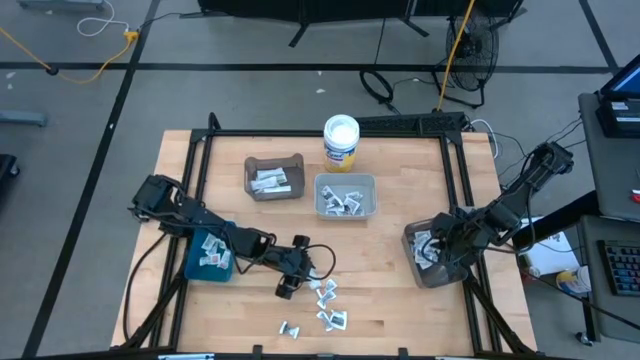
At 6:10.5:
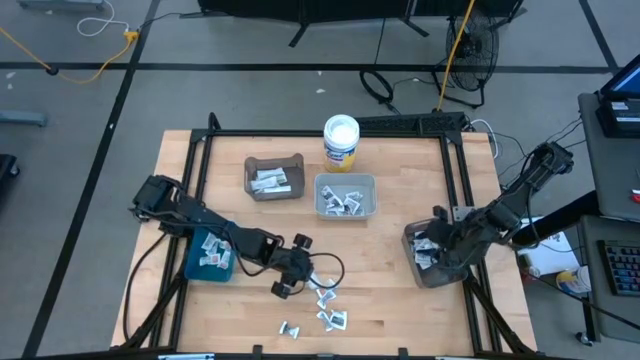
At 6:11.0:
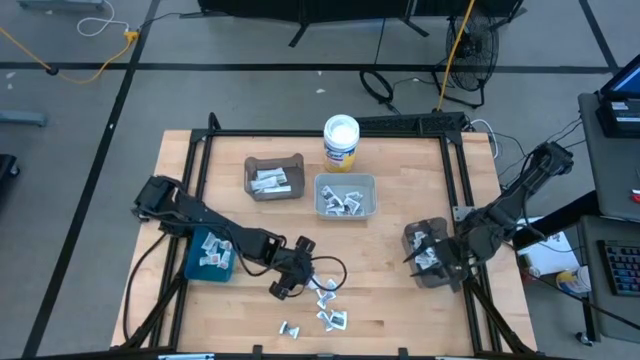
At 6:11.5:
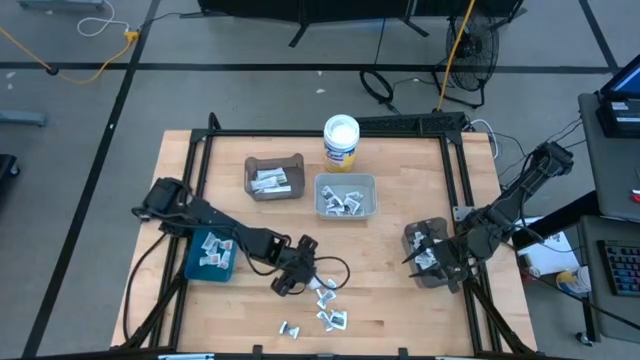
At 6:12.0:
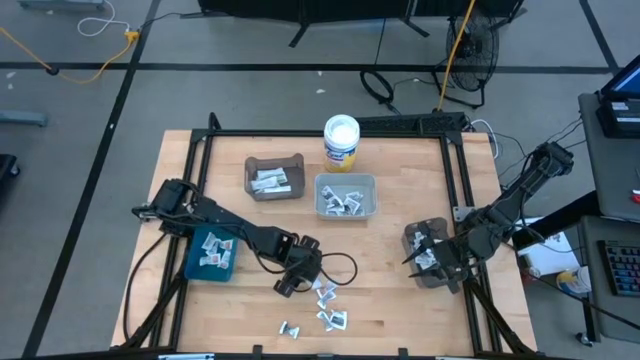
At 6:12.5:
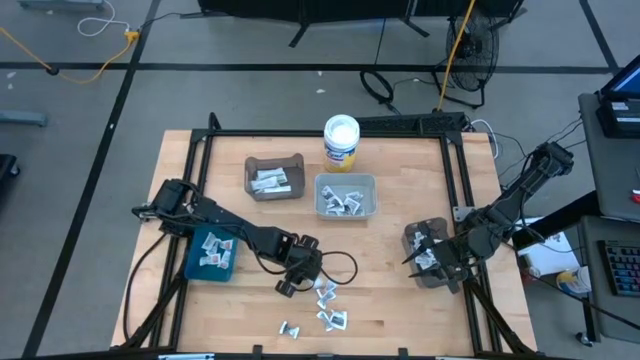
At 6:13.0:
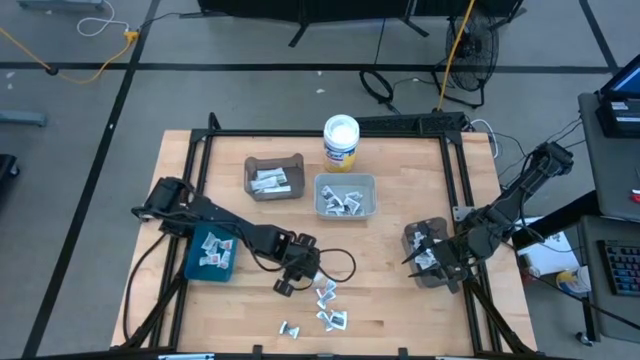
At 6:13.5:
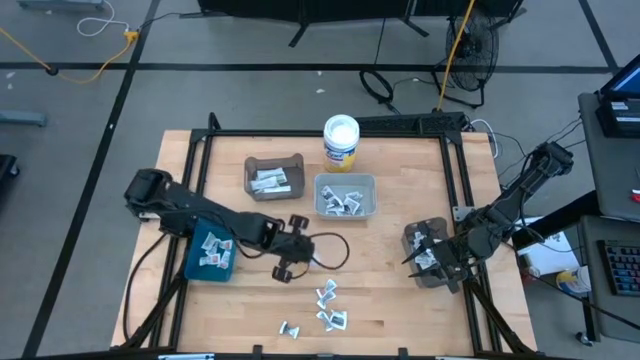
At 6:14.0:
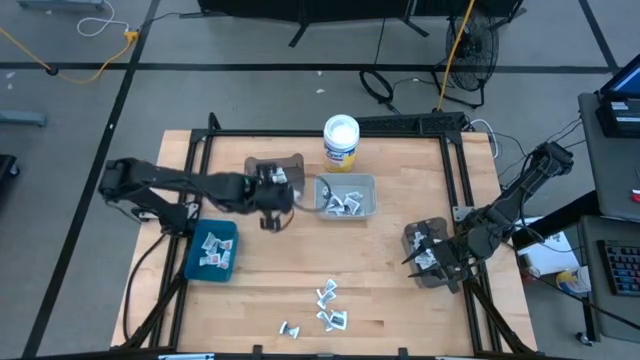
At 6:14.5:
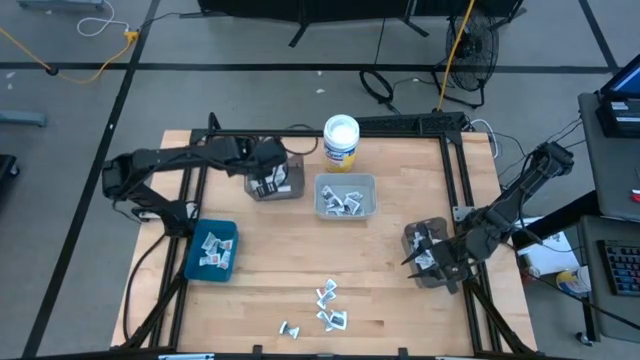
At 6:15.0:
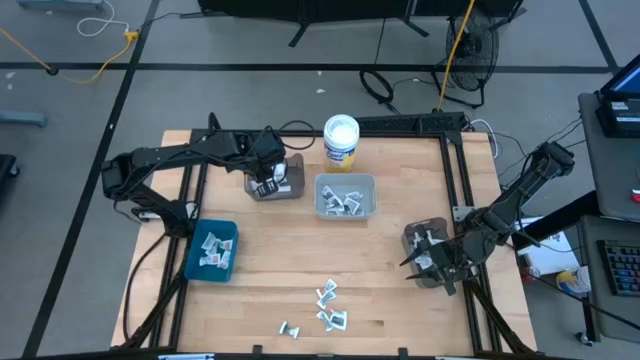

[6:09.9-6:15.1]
Task: Pick & Place First Aid Supplies
Put the green bandage pack into the top black bin

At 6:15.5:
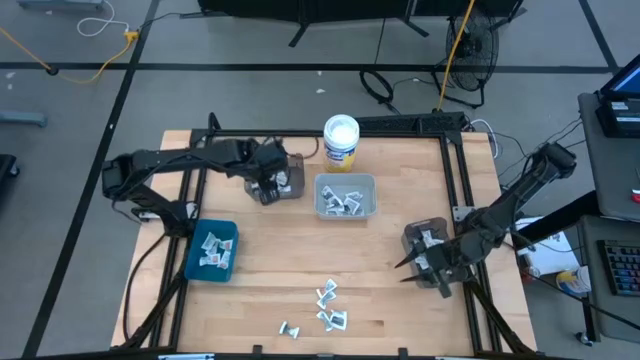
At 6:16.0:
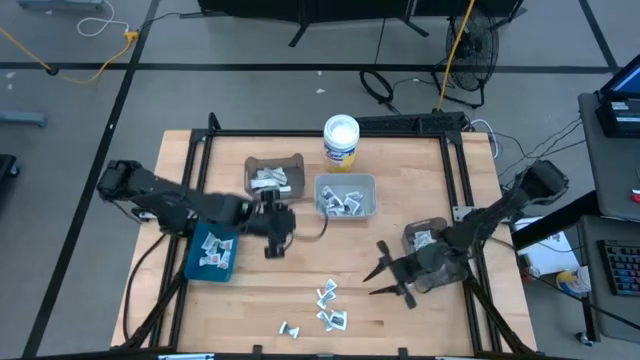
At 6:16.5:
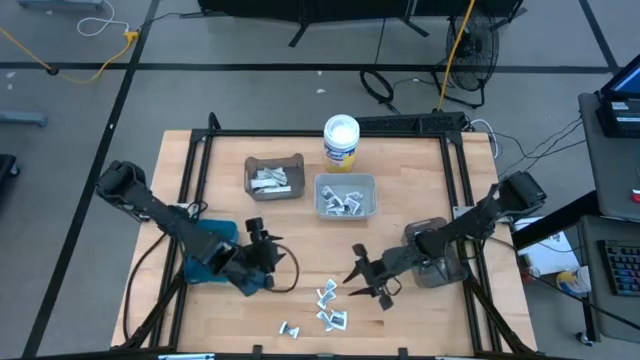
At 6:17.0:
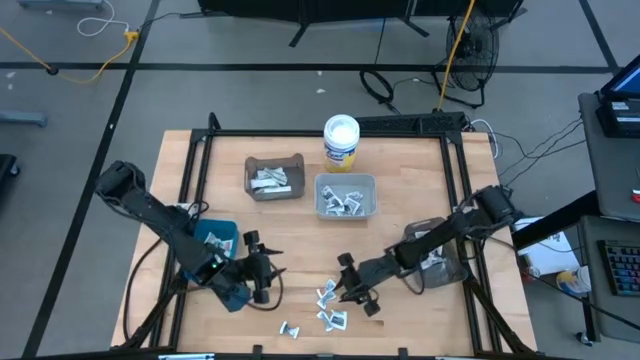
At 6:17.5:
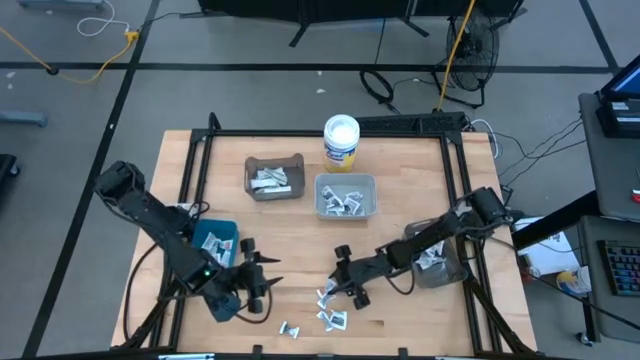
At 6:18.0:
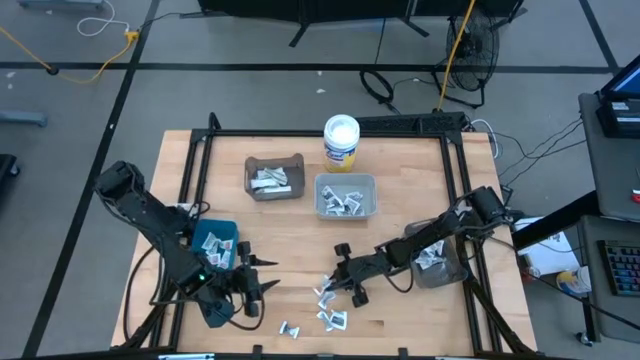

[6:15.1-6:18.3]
Put the orange ointment pack into the blue bin

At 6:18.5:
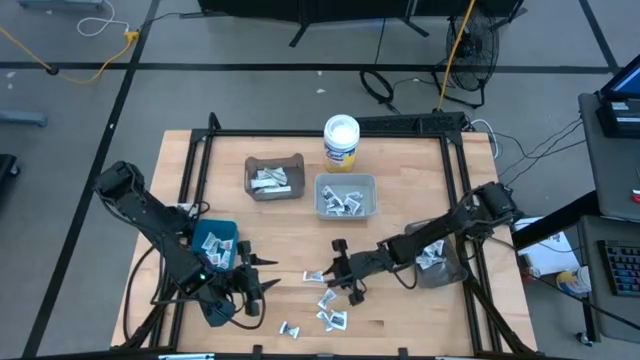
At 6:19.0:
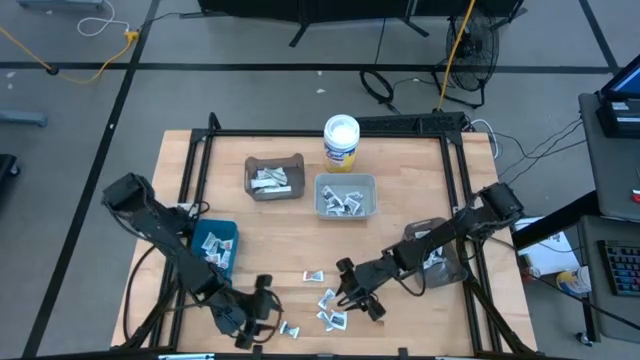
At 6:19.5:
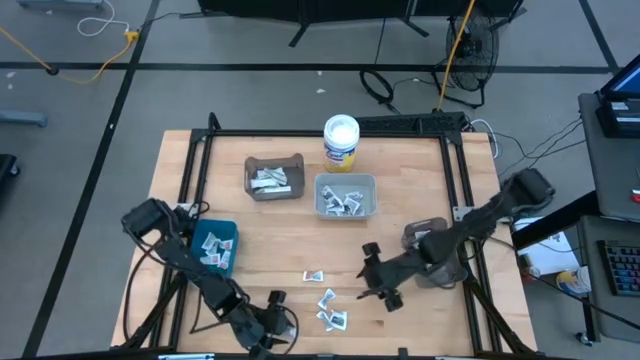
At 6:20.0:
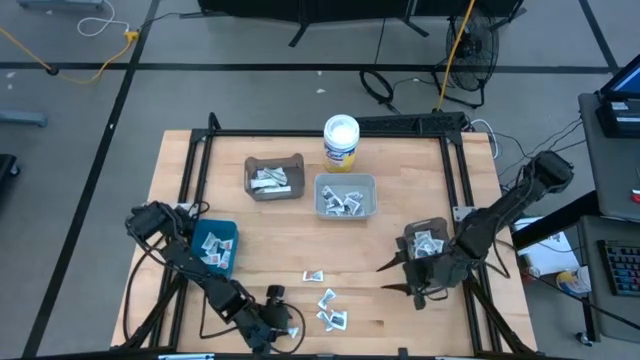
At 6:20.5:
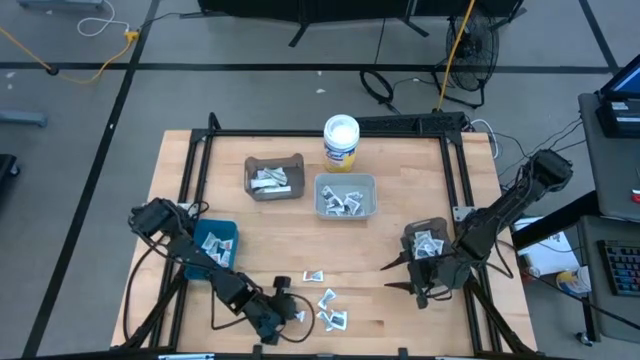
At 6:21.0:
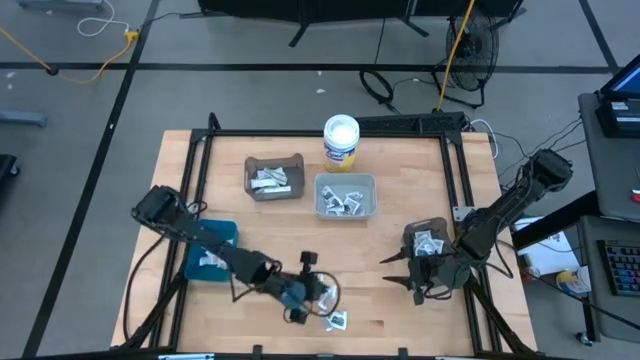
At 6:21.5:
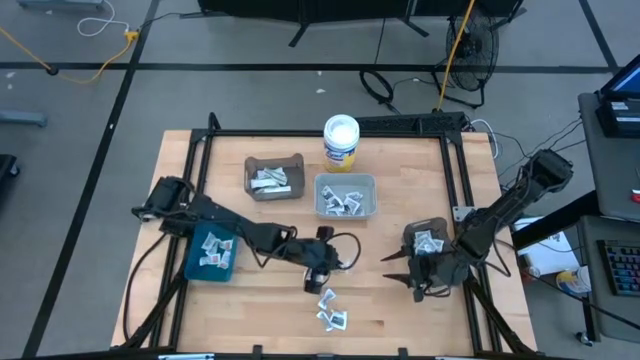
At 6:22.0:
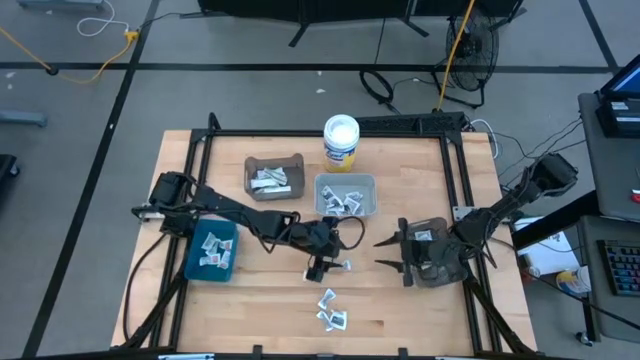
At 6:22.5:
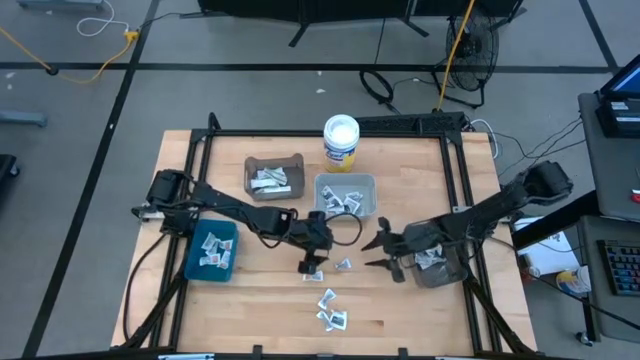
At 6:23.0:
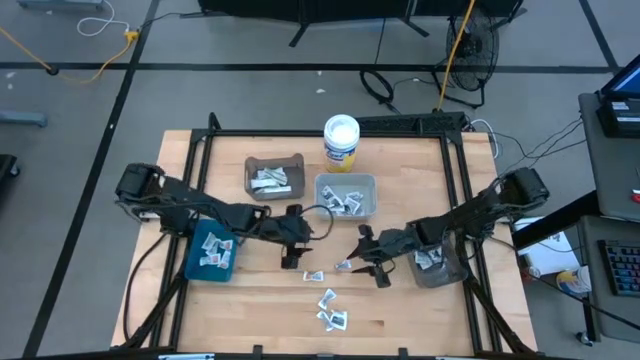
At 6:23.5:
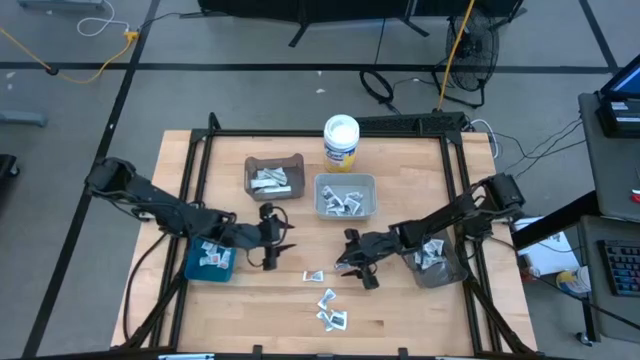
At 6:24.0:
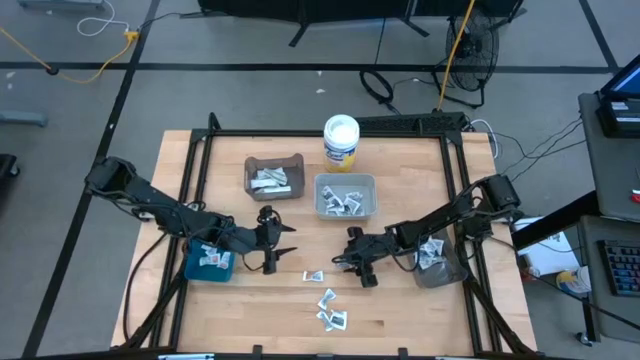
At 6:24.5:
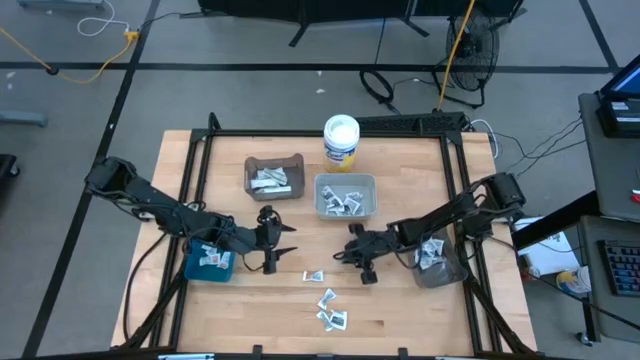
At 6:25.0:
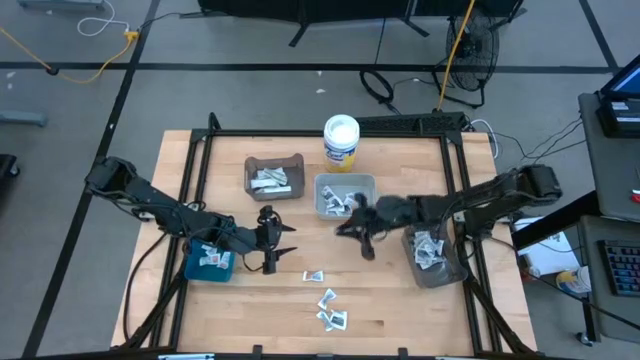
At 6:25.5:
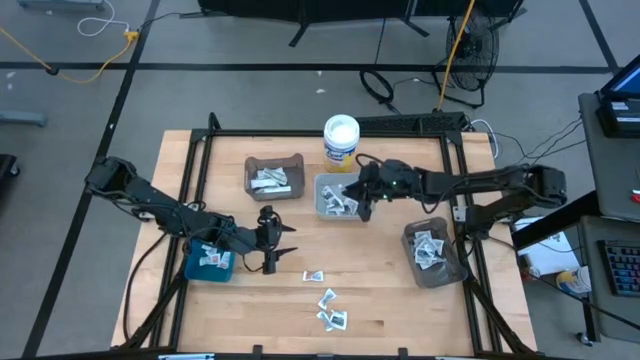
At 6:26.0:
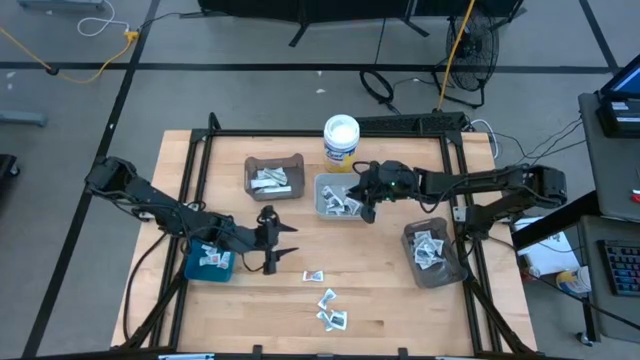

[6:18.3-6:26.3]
Put the gray towelette pack into the gray bin

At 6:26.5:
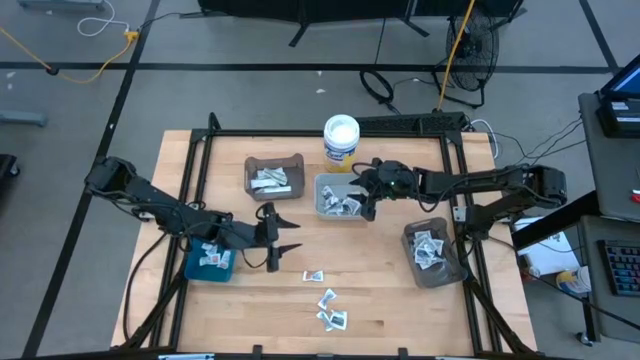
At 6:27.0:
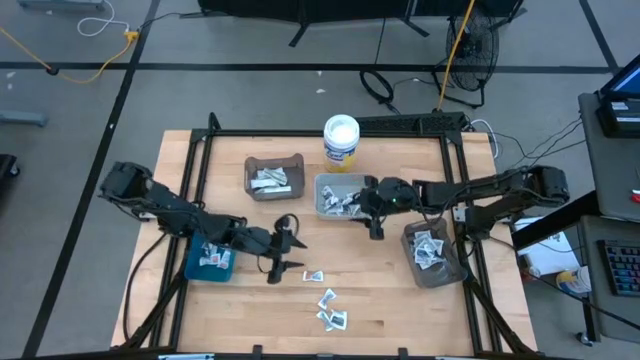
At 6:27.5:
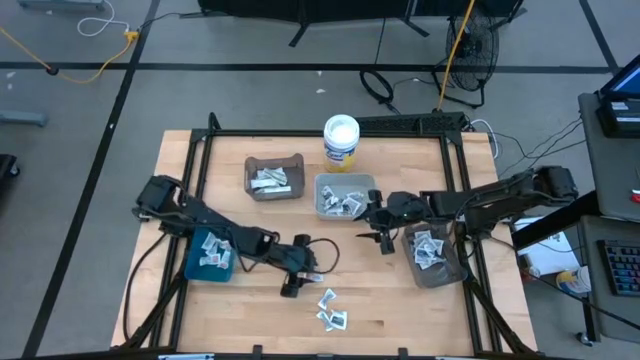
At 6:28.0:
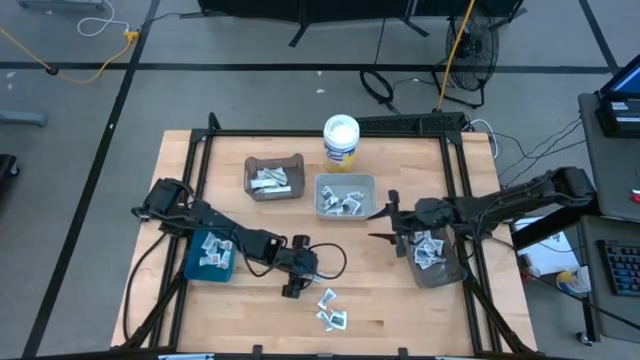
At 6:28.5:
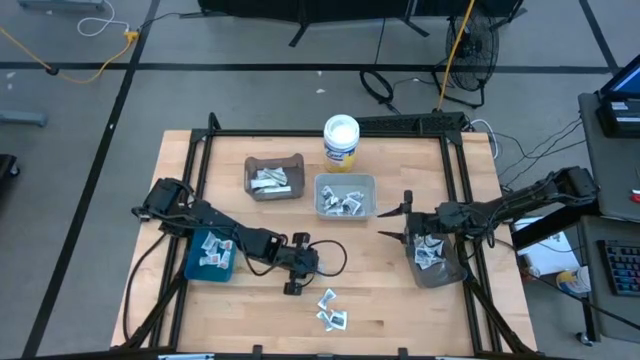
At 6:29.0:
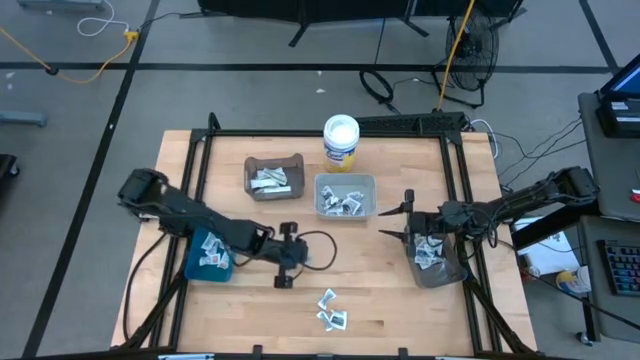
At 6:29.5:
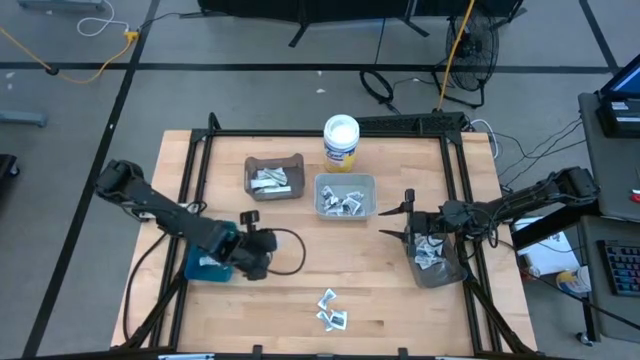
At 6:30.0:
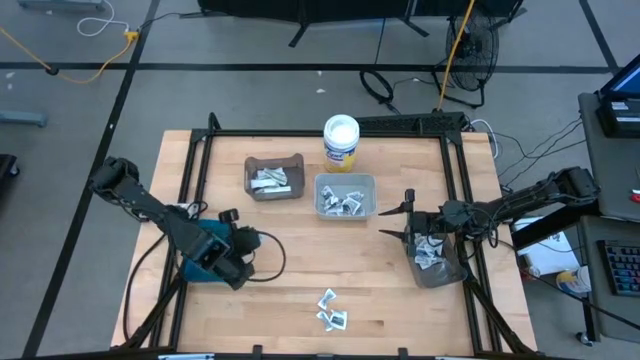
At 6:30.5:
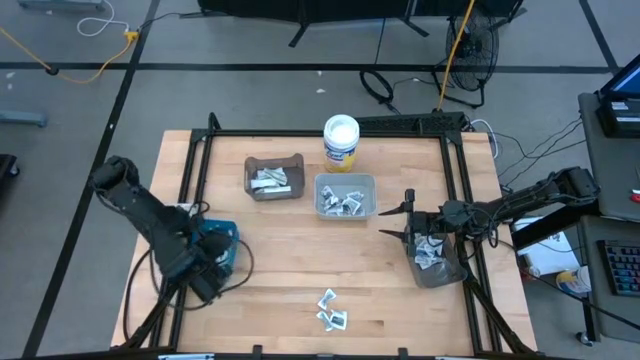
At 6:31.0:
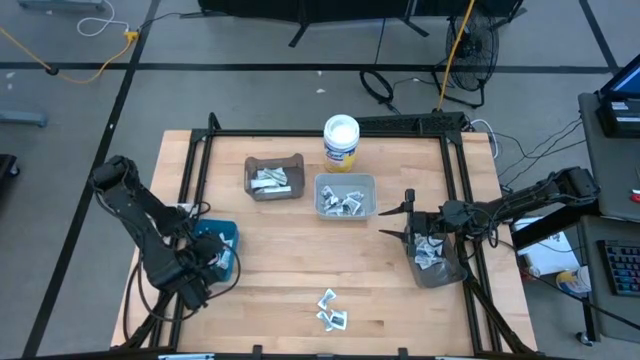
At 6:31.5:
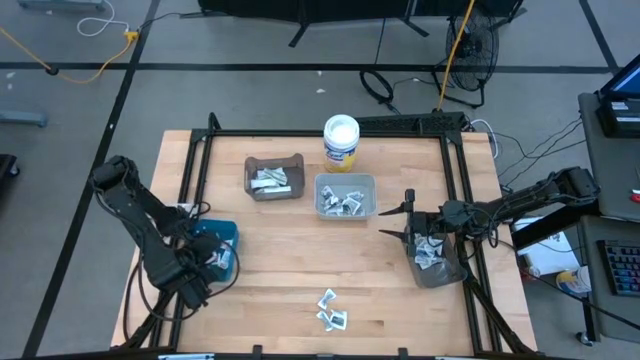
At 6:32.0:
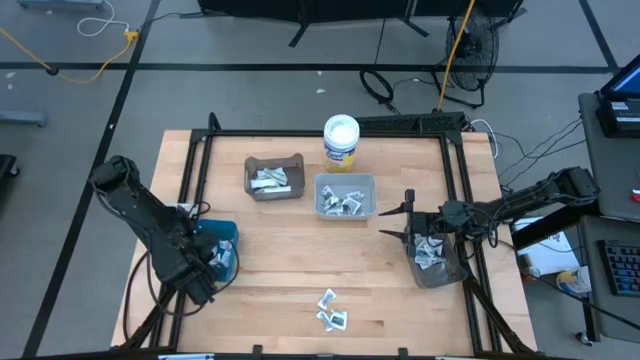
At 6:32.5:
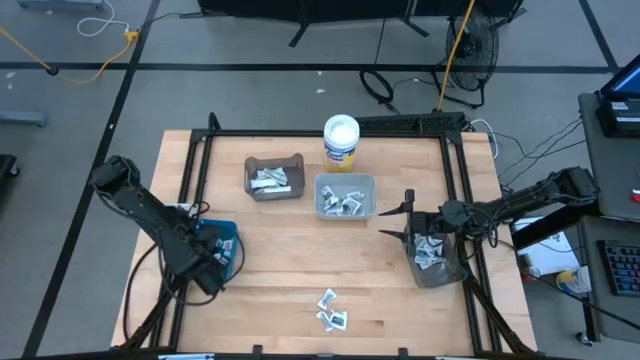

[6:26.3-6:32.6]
Put the orange ointment pack into the blue bin
